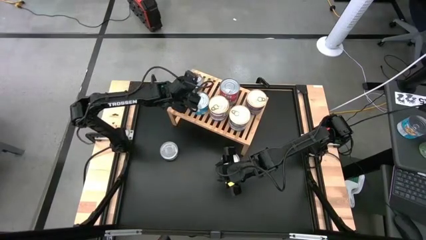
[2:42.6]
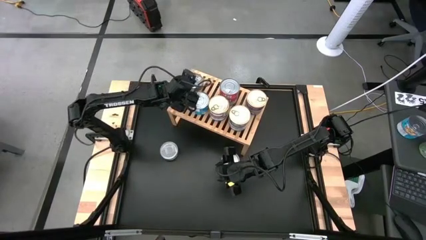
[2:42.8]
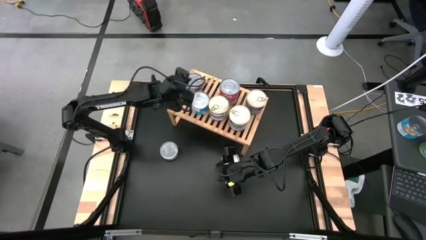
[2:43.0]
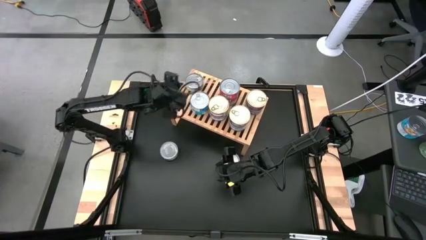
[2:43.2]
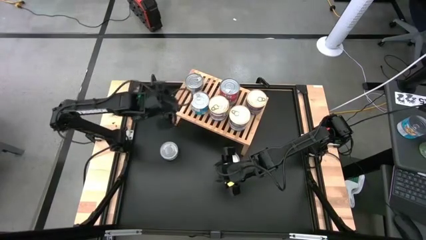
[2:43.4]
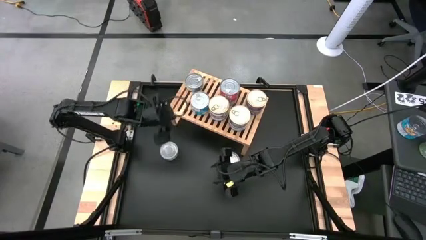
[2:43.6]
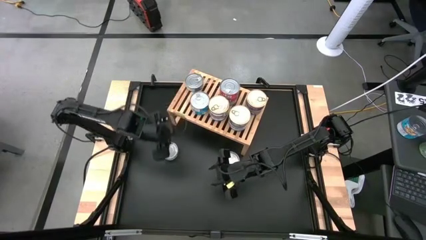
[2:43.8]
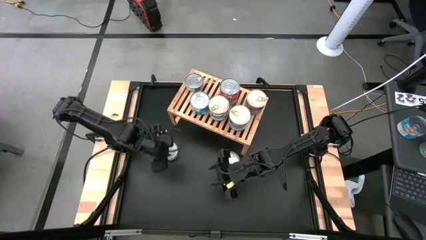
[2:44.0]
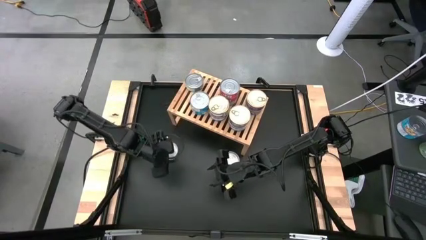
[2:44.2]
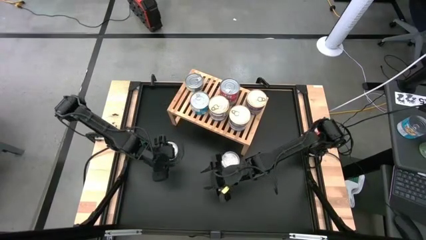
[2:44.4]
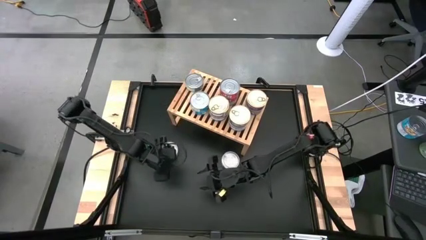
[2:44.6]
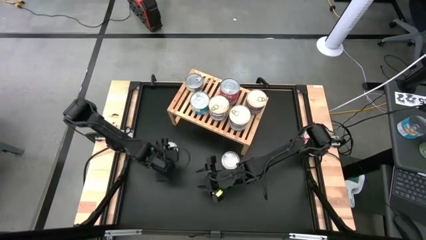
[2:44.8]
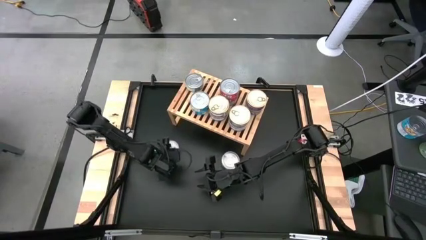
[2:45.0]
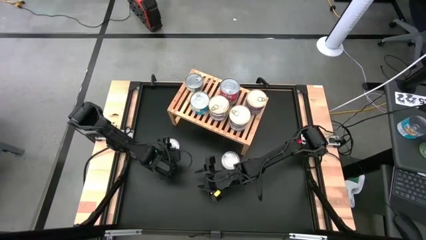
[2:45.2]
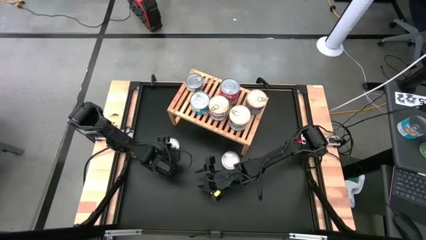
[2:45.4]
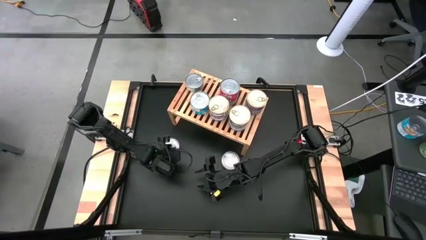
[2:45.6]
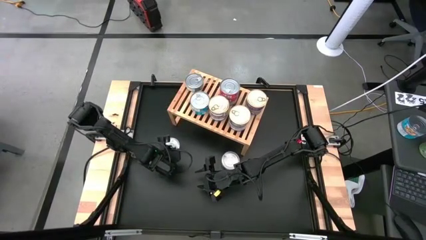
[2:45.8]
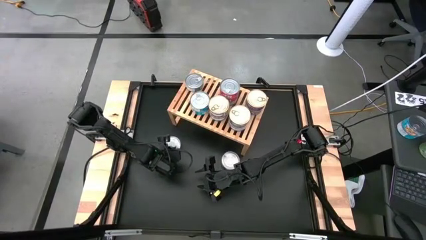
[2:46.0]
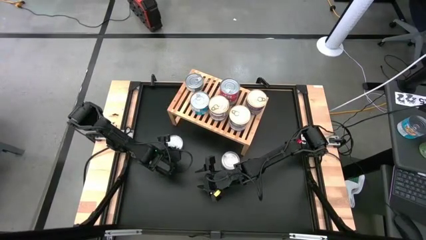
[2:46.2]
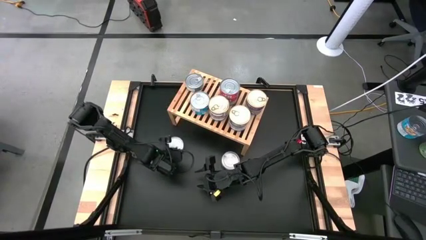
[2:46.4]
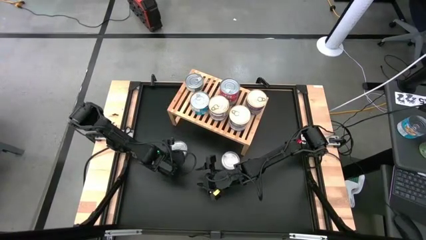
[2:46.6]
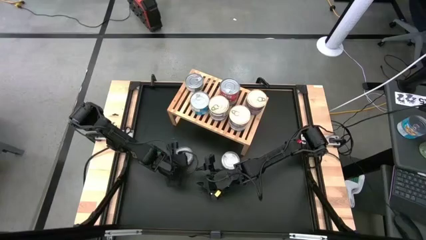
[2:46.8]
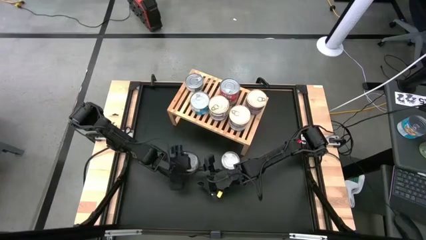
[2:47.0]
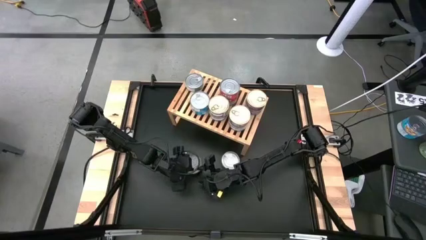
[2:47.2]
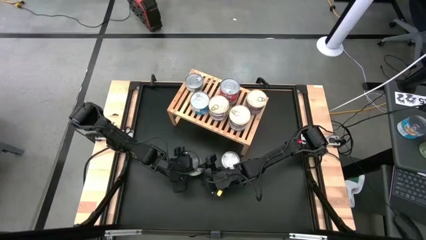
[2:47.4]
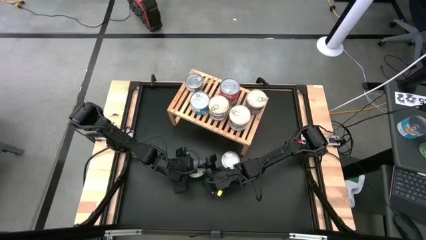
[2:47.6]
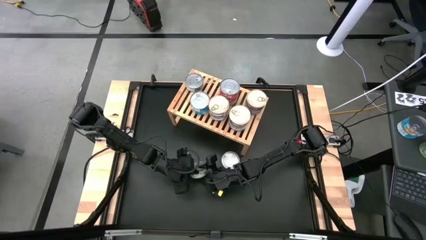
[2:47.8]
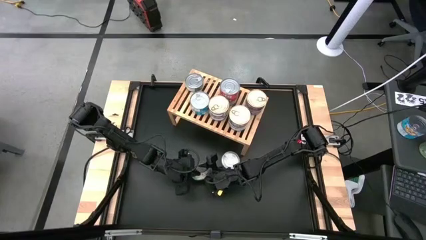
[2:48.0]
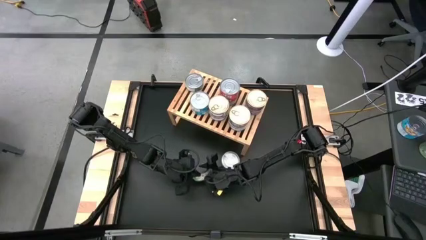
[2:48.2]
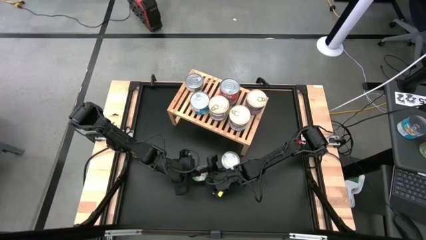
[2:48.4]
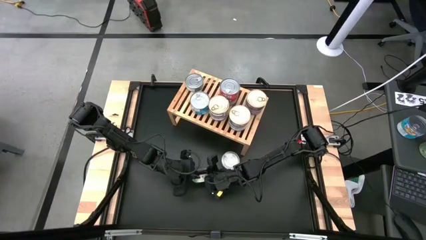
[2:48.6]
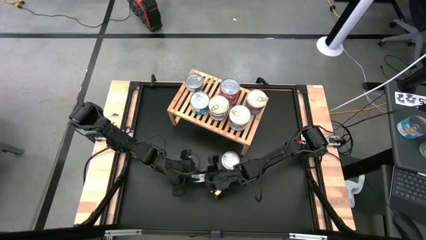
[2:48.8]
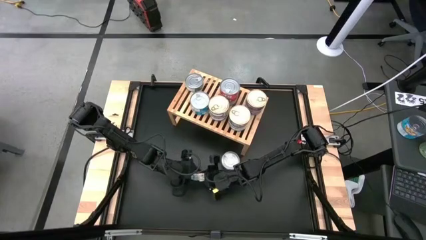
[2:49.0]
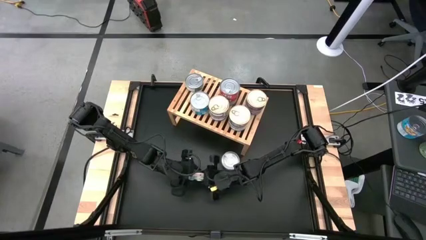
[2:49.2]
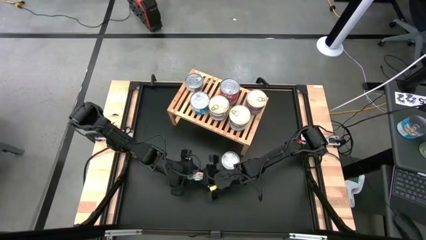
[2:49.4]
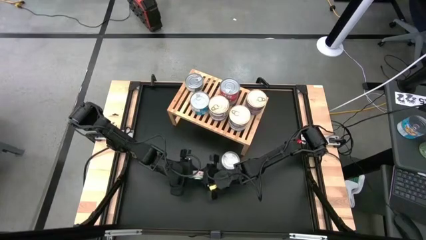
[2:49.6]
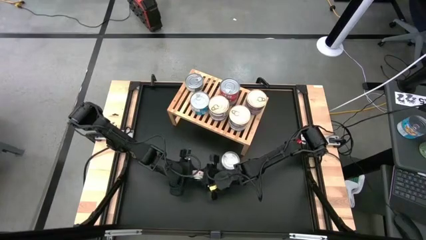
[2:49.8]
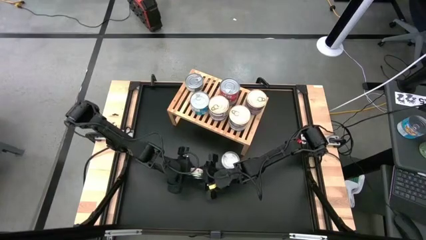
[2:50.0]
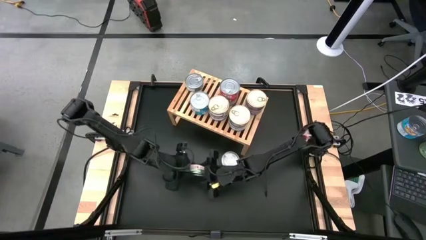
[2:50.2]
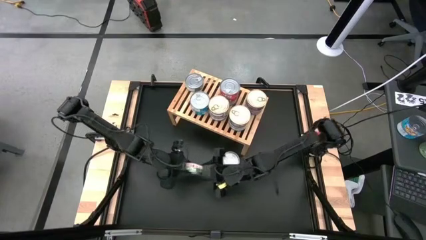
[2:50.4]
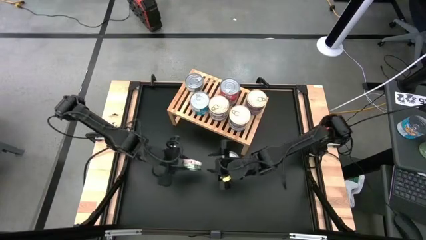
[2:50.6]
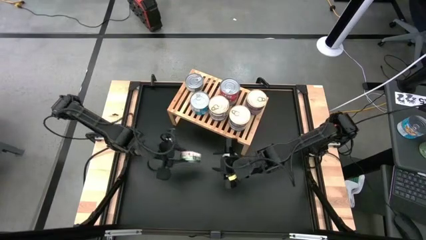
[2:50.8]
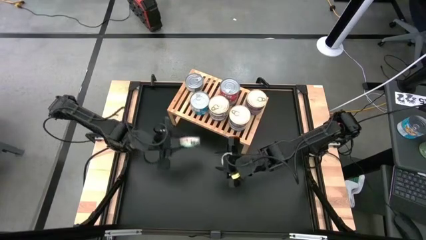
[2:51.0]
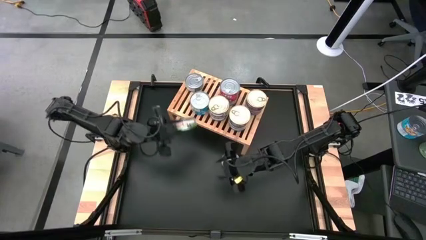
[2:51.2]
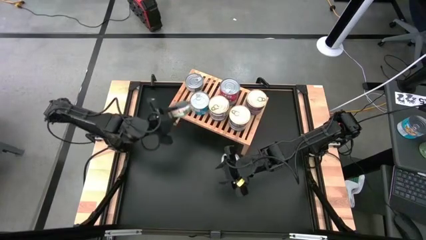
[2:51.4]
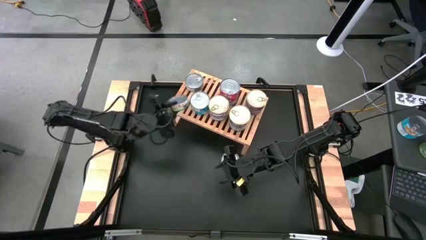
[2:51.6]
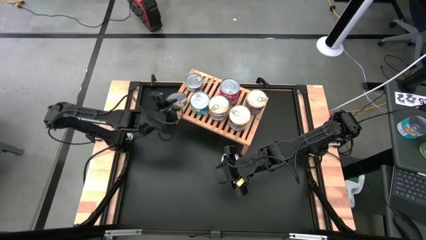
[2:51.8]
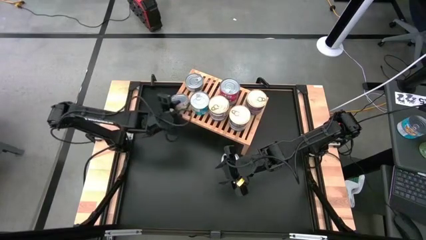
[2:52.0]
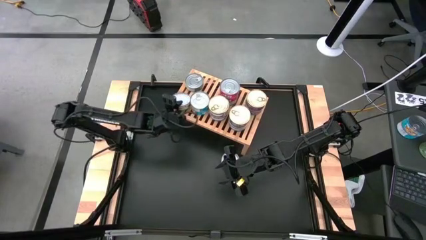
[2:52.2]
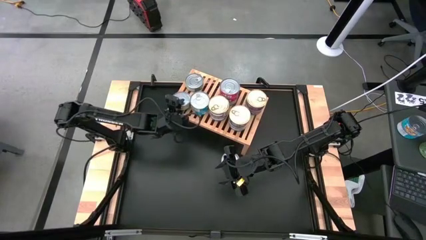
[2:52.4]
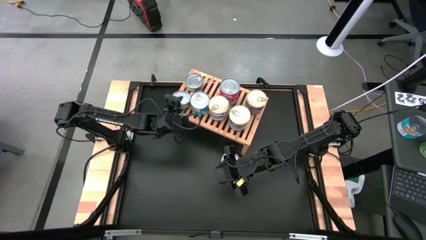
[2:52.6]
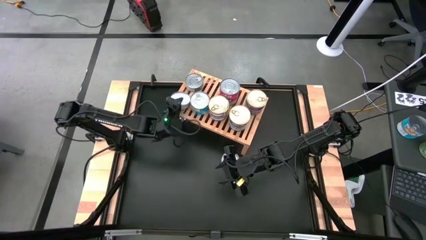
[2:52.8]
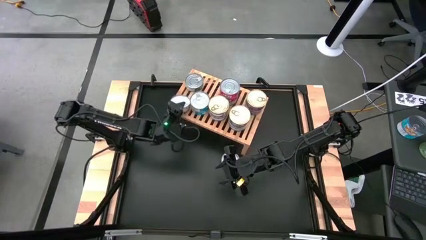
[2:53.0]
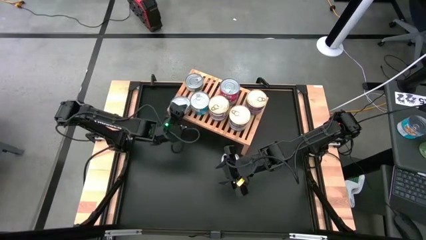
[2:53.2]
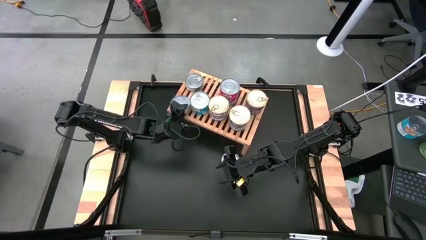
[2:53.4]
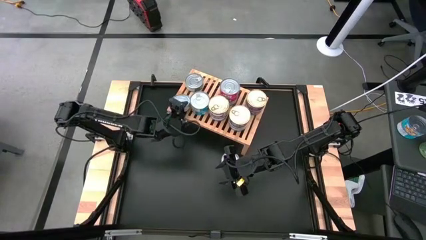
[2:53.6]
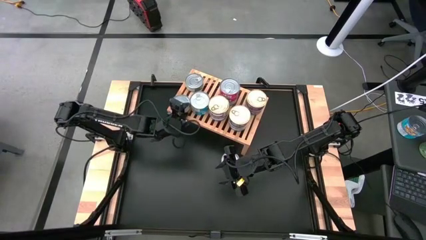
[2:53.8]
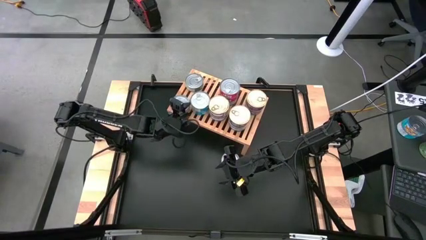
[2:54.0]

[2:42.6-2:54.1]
Task: Stack canned seafood by type on shelf
Put the green tuna can aligned with the other green tuna can on the shelf

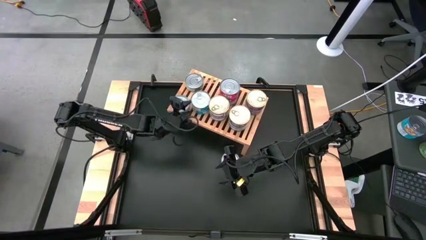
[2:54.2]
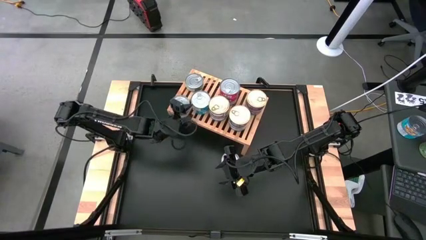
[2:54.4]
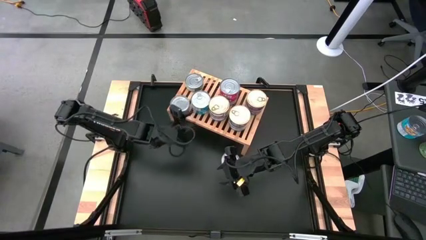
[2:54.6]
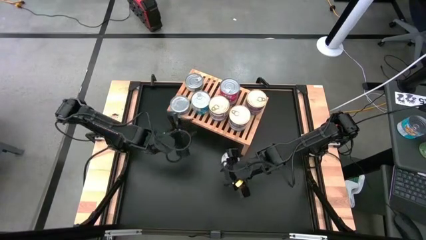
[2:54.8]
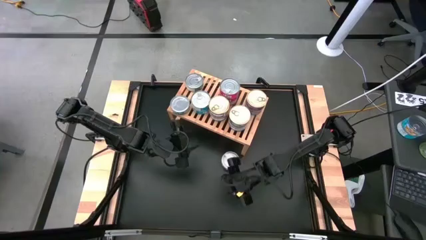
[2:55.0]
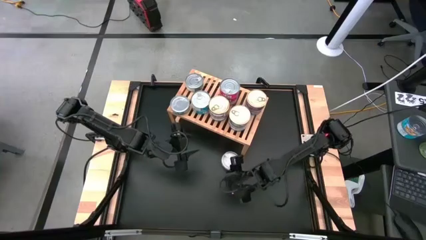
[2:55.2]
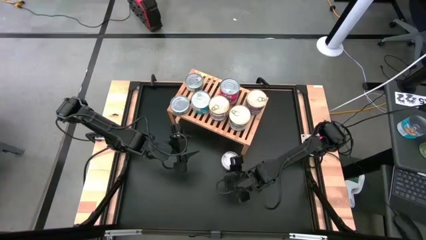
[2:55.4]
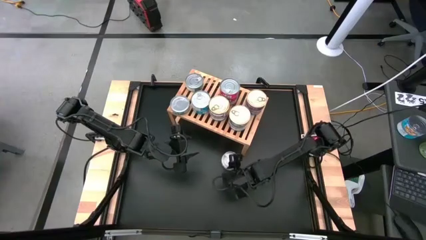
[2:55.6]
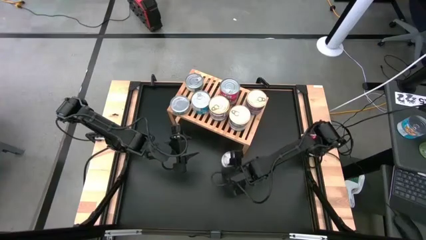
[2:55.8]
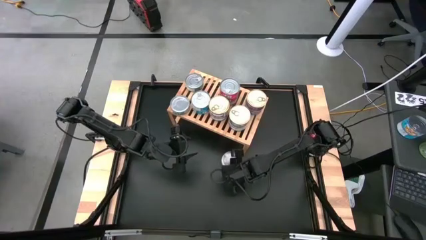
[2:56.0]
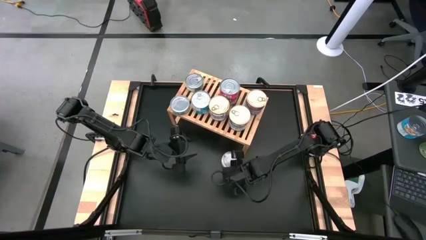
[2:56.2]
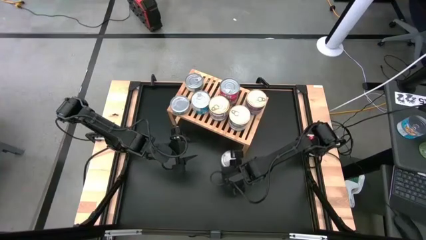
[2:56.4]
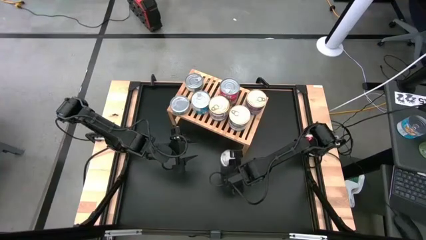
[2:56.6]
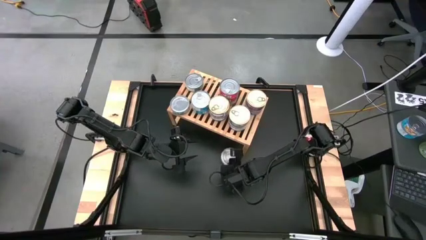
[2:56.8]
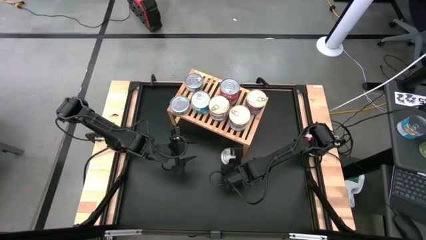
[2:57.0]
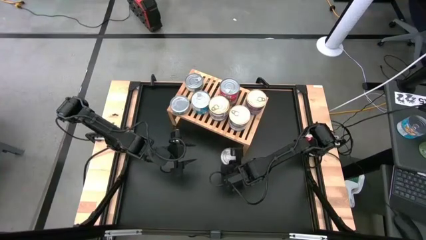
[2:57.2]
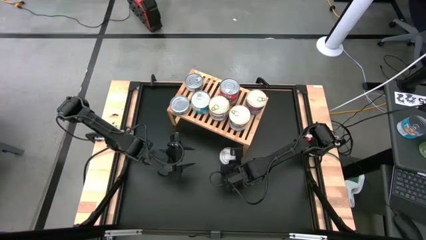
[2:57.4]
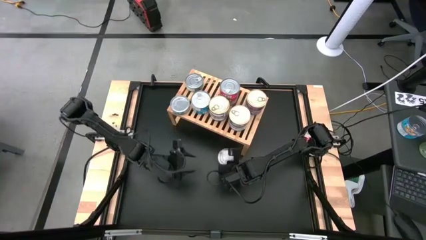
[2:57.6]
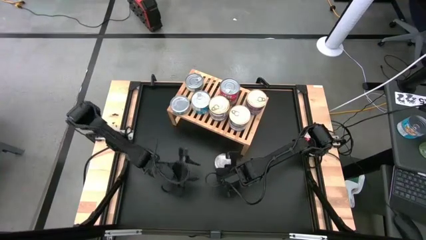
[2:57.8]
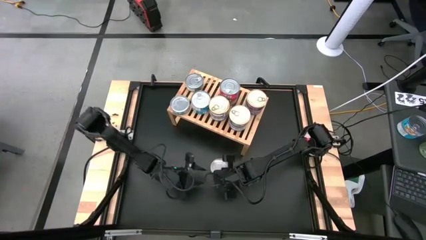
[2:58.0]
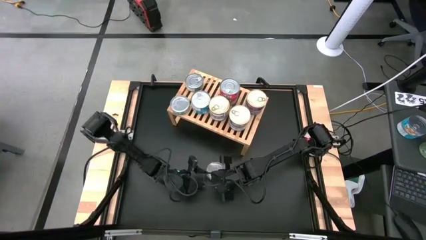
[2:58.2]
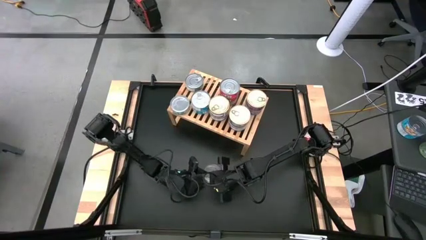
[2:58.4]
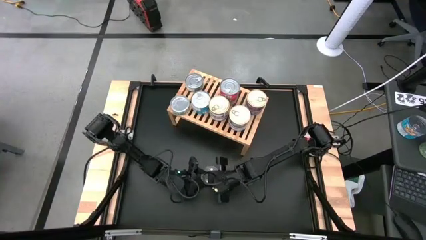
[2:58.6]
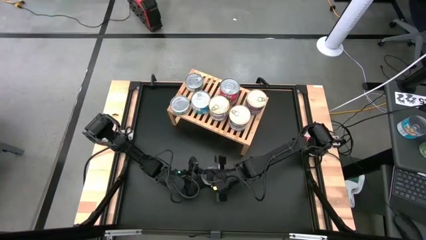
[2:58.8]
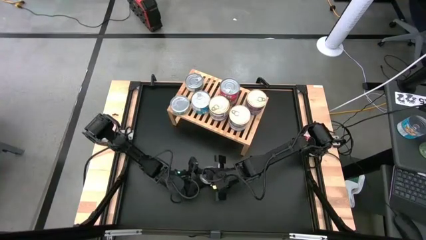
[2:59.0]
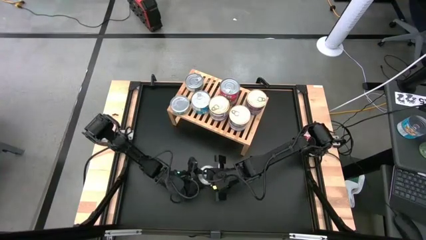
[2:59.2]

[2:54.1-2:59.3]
Stack the green tuna can on top of the green tuna can on the shelf
